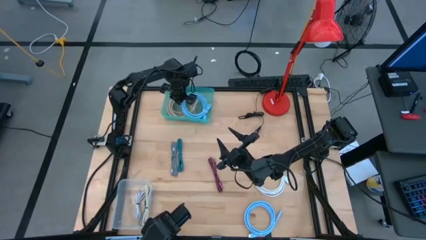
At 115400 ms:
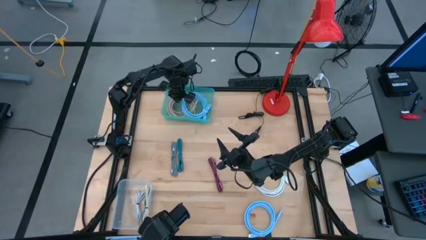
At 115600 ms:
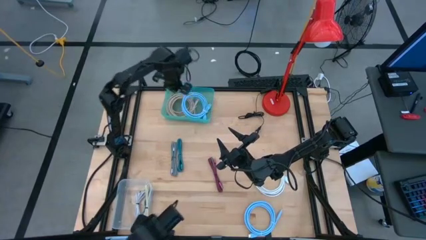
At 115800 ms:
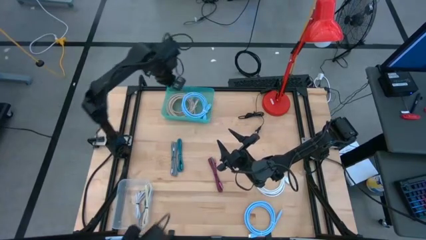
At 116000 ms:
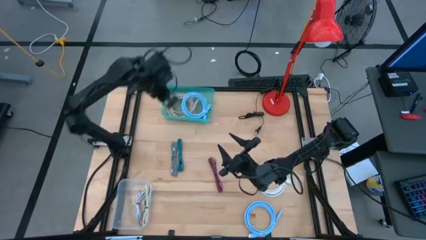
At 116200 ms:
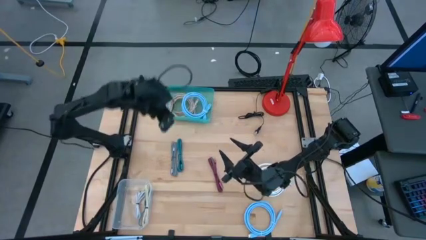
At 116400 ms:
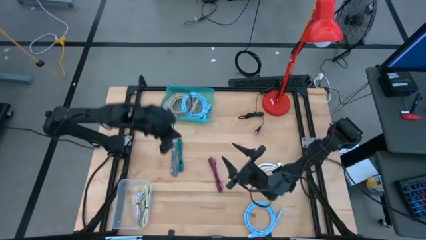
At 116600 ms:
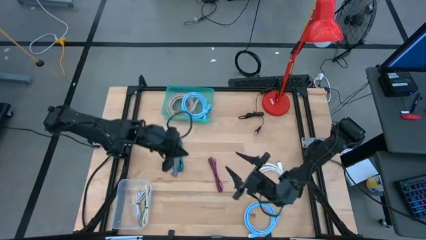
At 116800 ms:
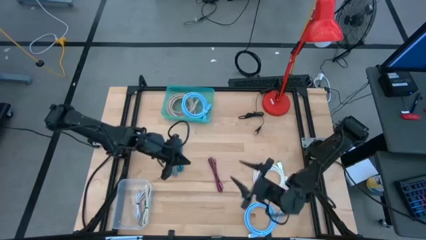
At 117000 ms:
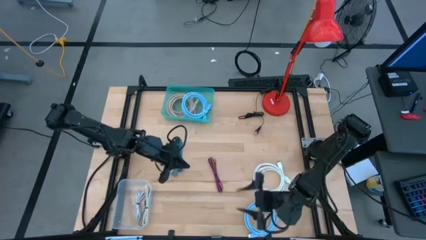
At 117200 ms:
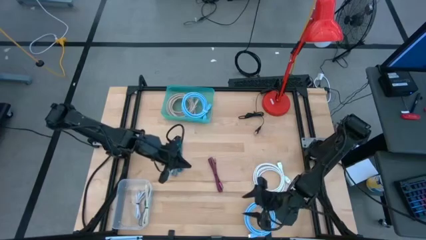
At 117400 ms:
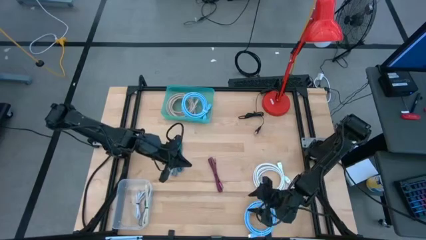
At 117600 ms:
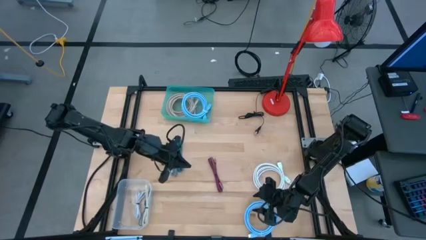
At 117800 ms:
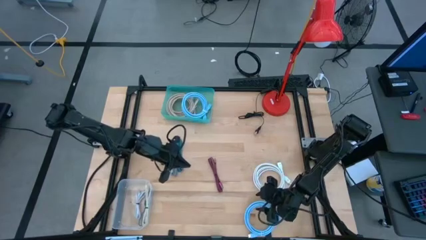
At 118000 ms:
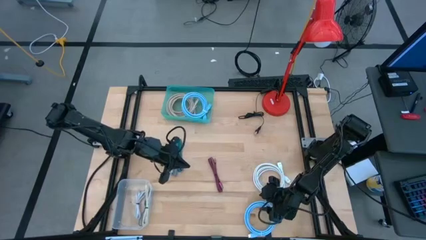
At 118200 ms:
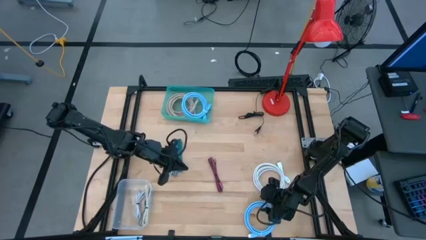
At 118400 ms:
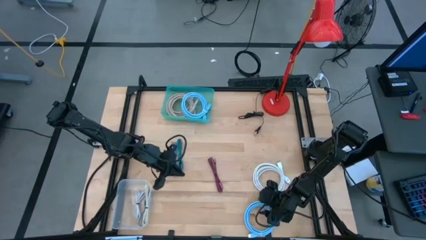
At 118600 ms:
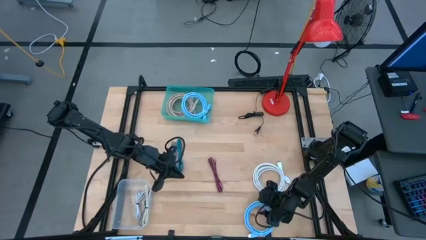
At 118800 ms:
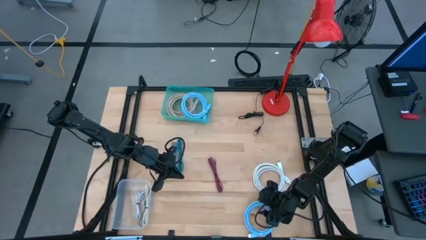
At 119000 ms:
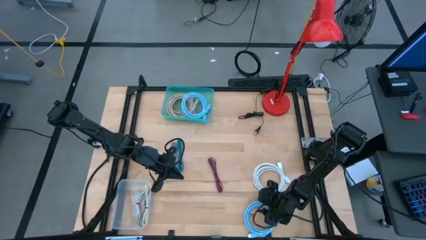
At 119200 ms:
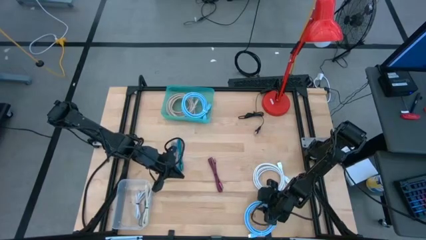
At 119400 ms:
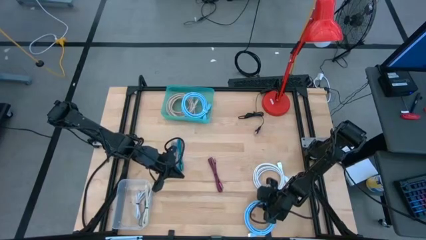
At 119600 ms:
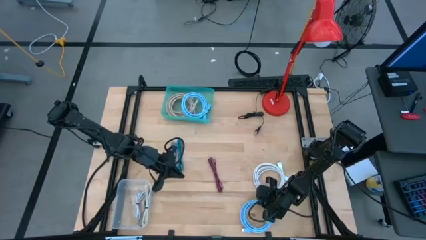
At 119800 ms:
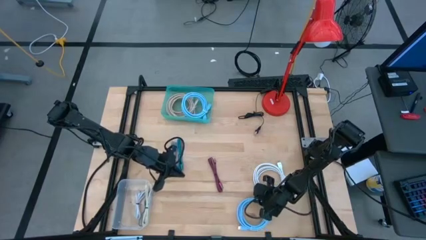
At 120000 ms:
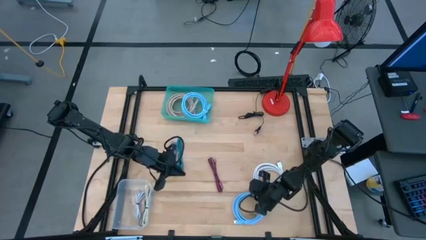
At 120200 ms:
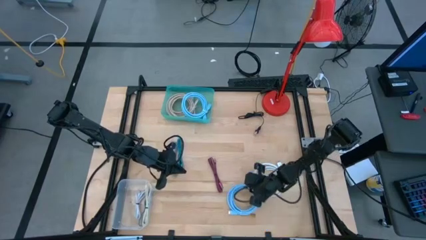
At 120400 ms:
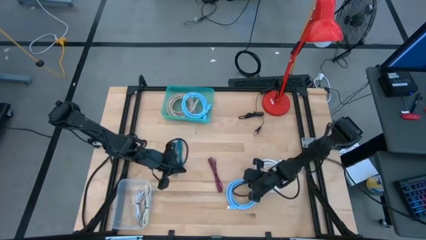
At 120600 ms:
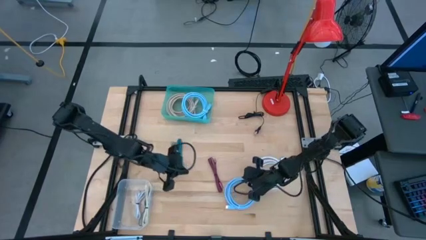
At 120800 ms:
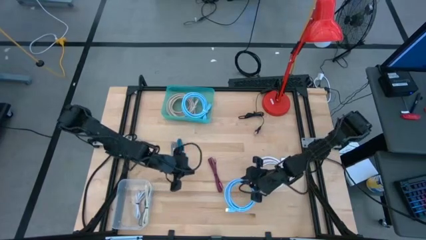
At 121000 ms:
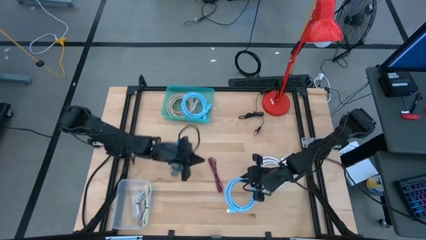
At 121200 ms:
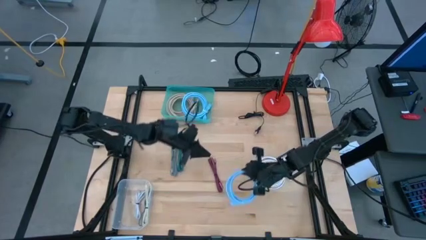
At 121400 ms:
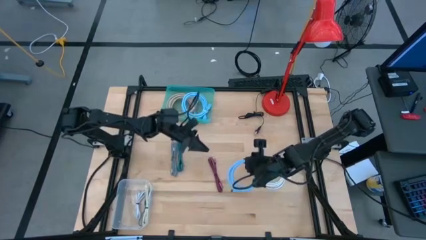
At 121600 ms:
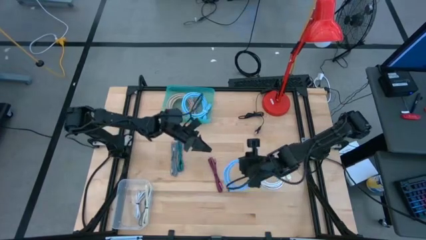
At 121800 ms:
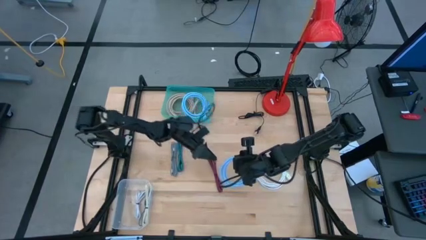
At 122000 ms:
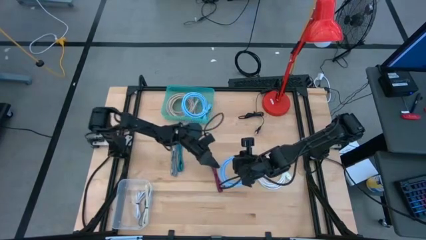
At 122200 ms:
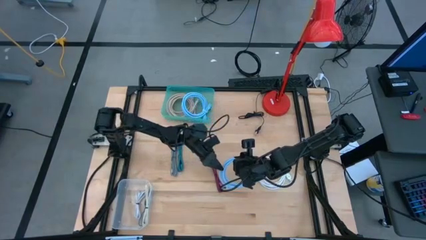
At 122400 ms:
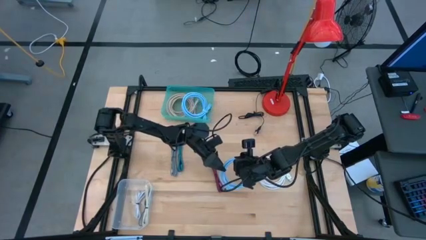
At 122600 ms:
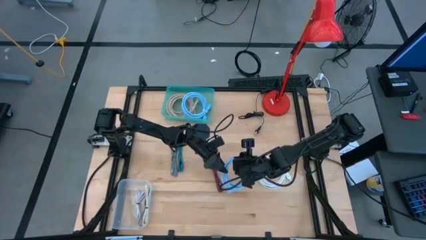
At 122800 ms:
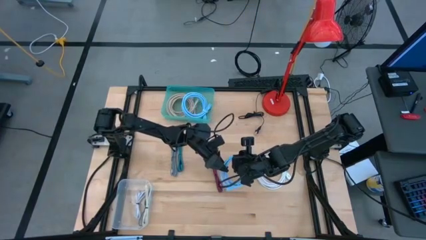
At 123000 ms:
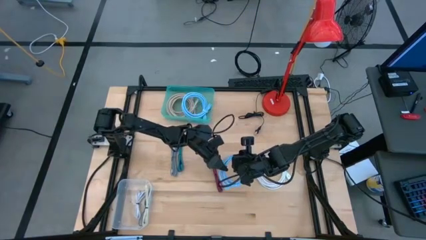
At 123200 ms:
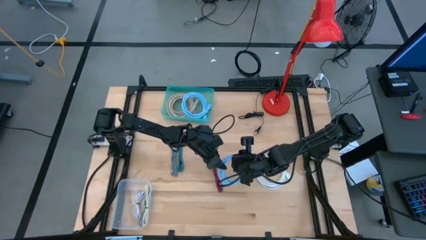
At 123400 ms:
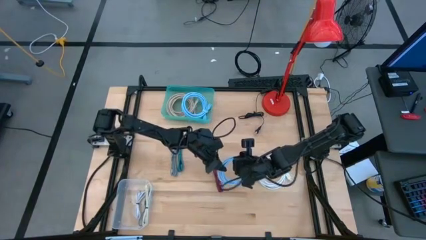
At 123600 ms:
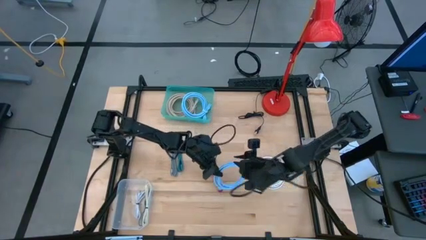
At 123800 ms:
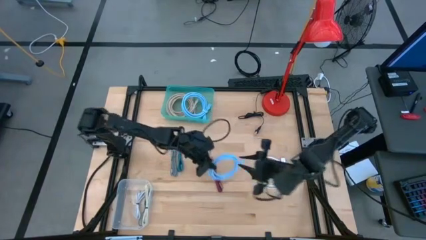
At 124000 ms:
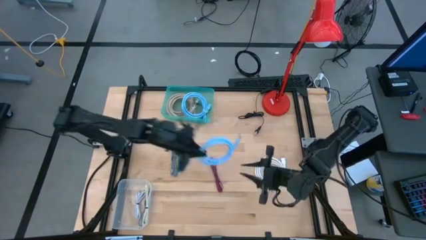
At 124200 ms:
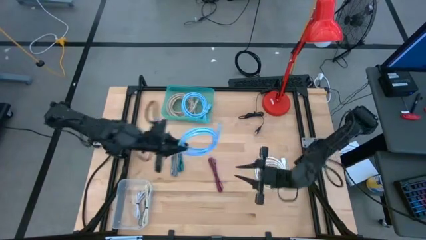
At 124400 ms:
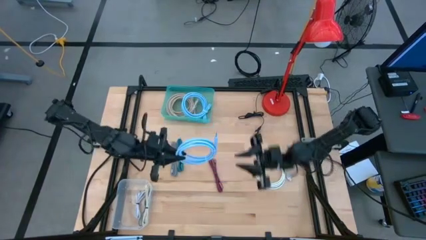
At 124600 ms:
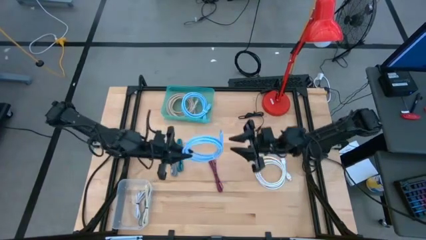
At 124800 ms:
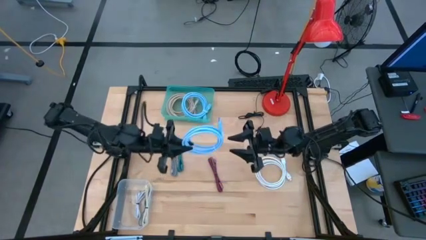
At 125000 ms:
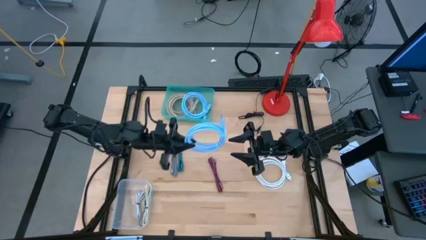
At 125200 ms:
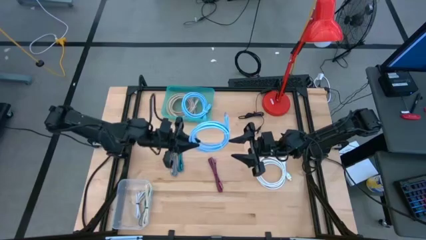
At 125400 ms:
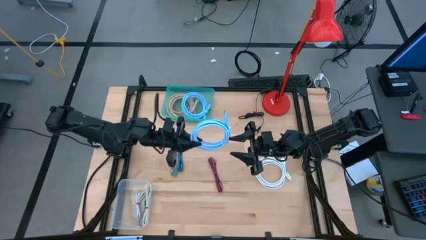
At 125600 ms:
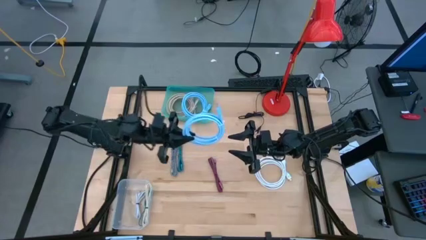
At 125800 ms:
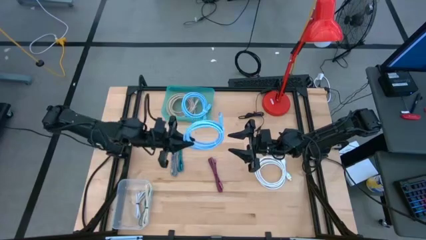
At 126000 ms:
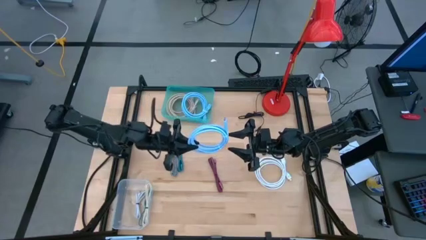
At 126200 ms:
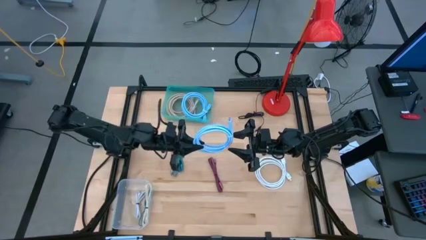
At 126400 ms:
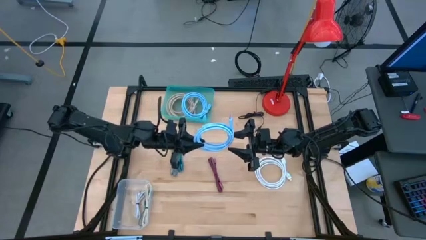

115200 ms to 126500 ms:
Task: Pick & Place USB Port
Put the blue HDMI cable into the green bin

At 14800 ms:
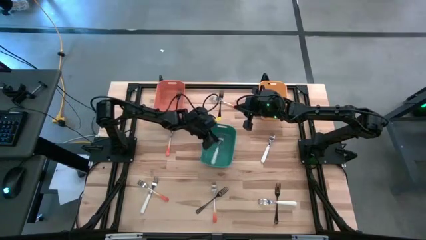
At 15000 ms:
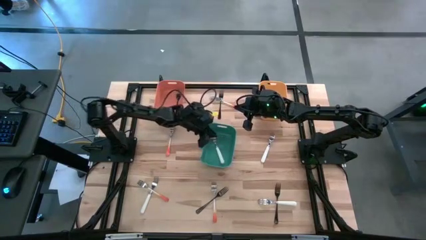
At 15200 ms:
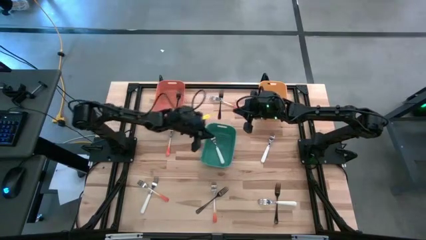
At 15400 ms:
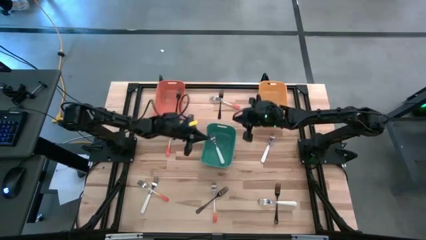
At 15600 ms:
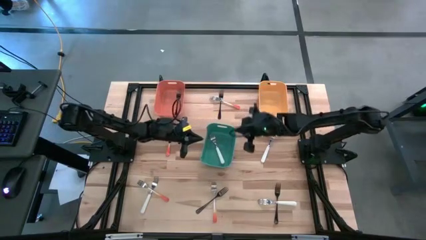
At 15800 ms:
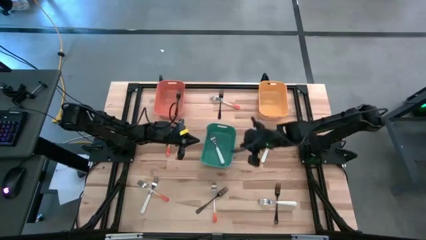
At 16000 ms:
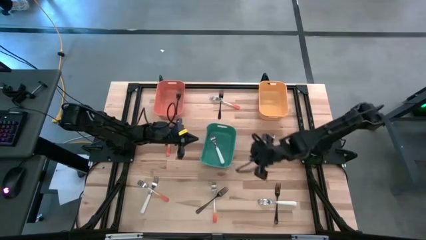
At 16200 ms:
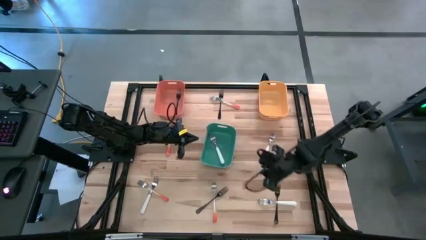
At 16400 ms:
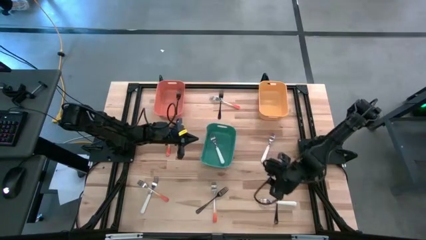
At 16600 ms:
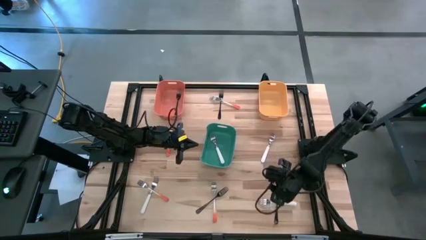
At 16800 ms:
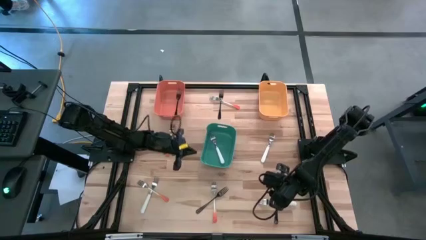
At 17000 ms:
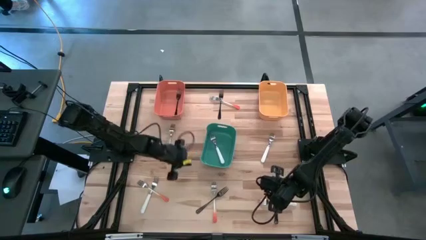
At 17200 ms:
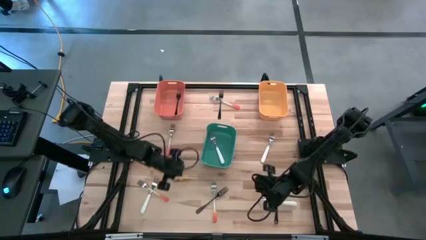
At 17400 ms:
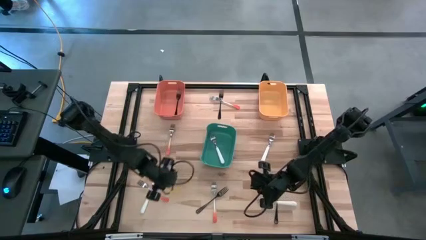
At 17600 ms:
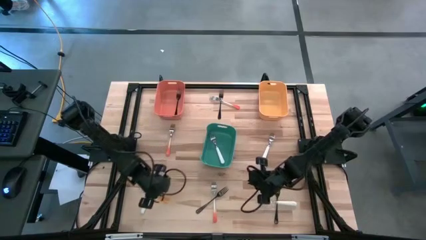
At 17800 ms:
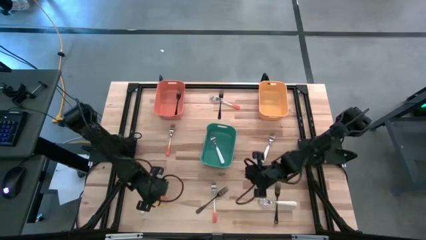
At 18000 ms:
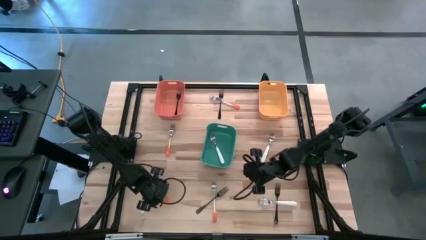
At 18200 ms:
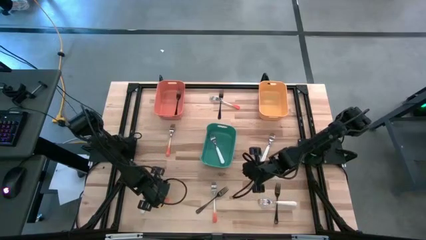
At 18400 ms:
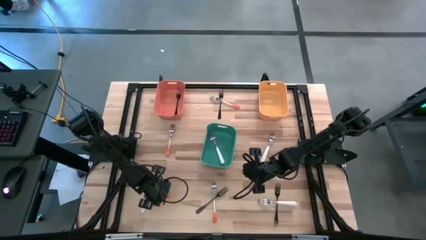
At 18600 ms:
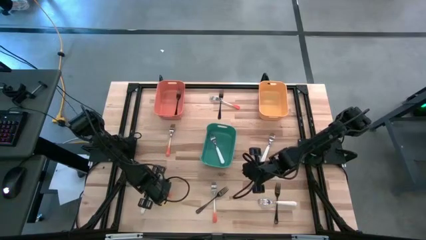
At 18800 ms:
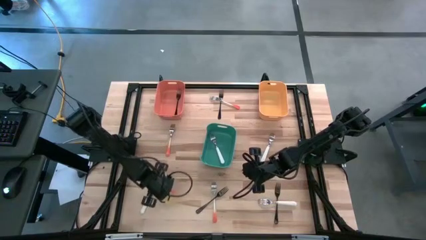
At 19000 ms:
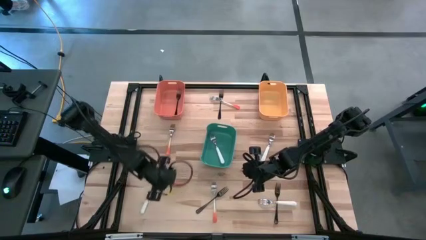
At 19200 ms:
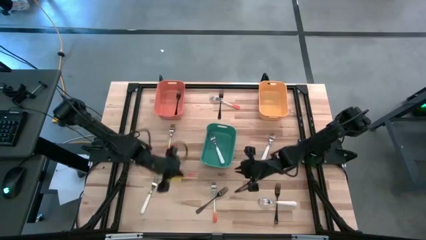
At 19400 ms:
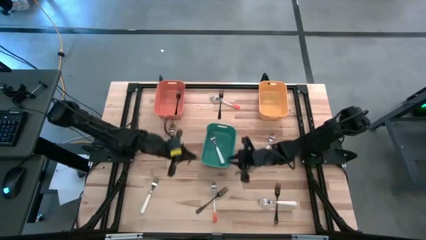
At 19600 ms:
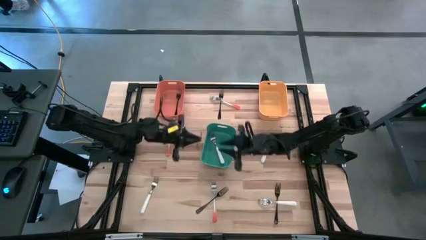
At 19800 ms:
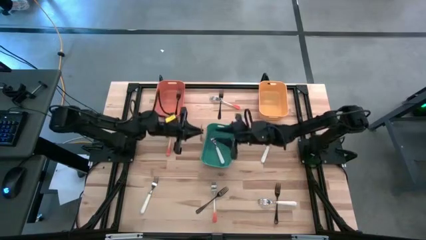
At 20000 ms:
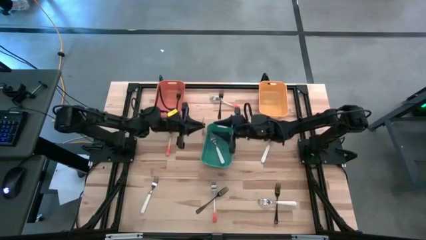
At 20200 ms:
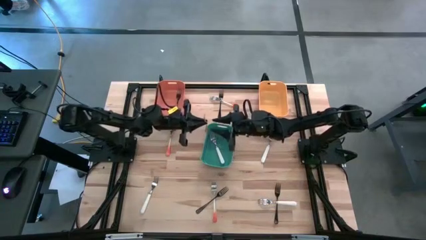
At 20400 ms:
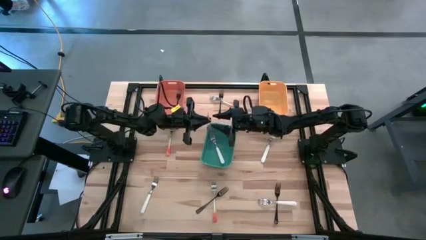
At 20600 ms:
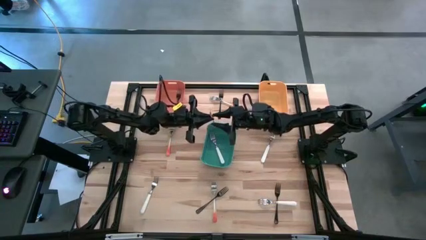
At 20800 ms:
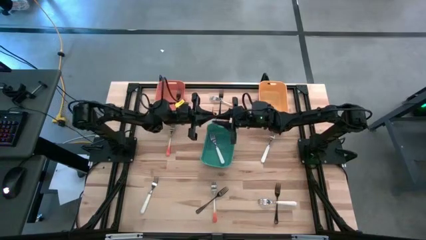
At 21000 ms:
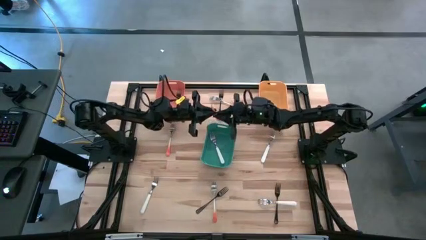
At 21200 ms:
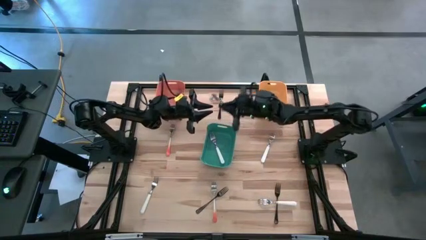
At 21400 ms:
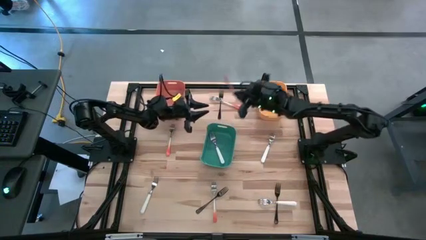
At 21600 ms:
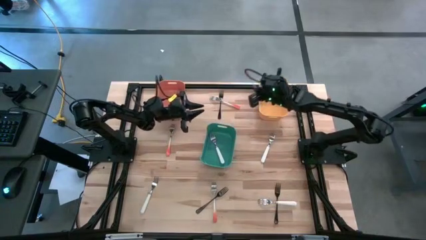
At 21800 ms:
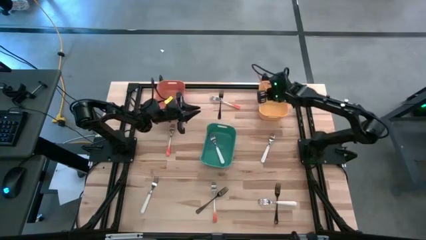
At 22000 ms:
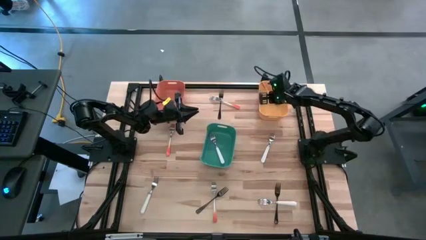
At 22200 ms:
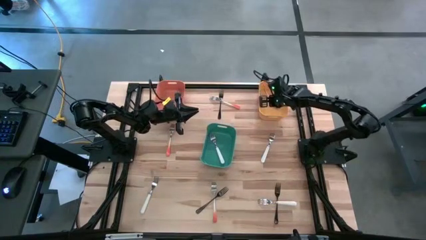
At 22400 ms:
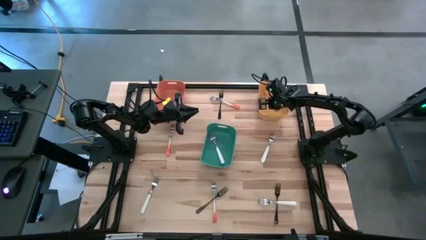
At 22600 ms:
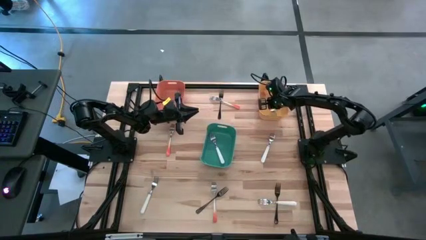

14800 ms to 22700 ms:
Task: Sort silverware by color (type)
Put the bottom left orange fork into the yellow bin
